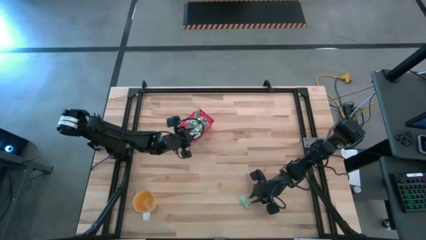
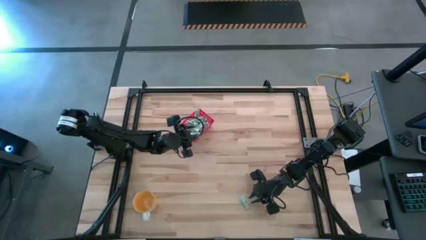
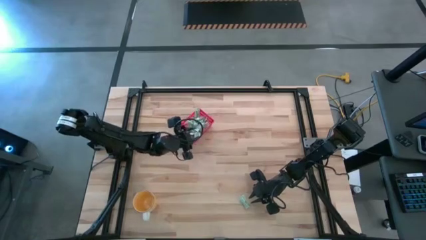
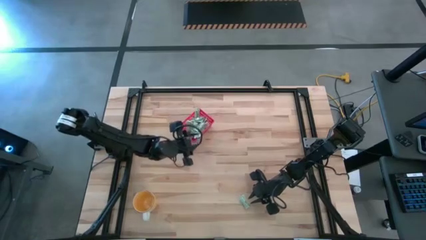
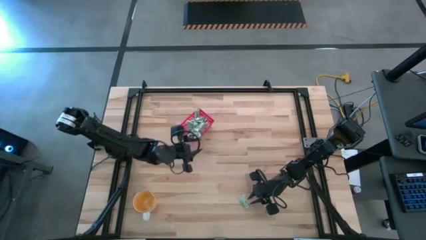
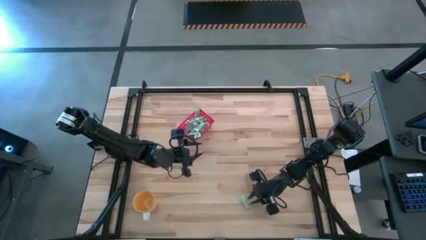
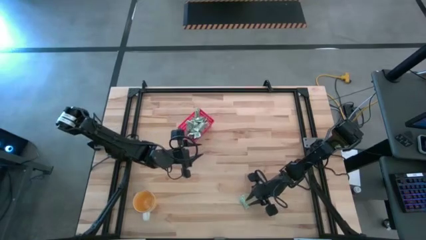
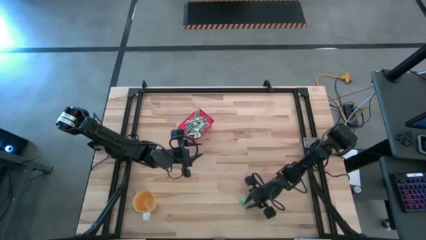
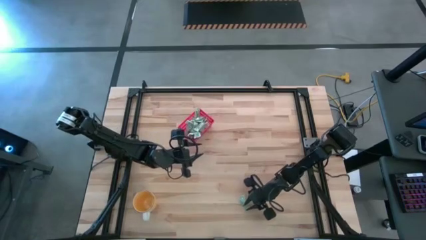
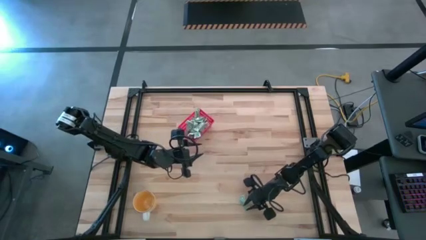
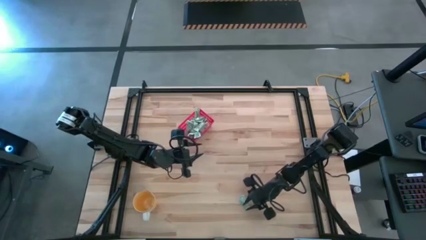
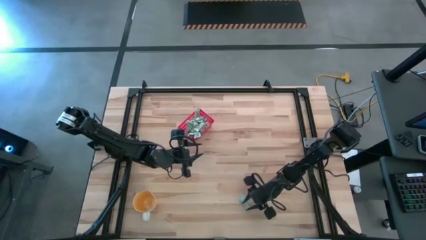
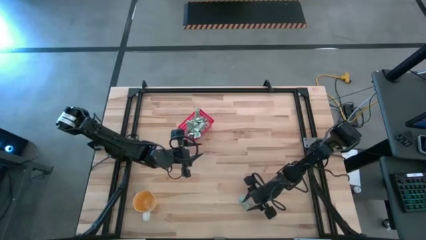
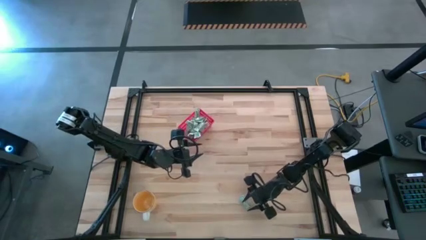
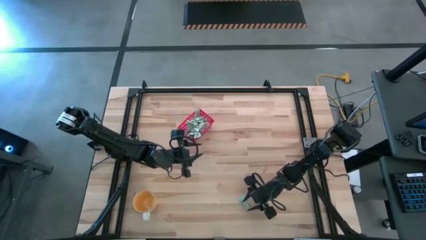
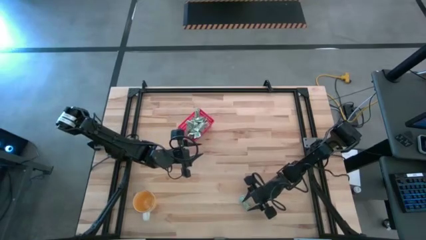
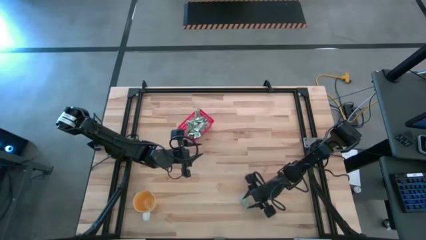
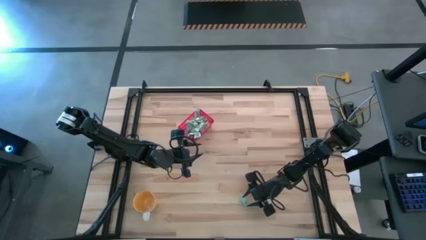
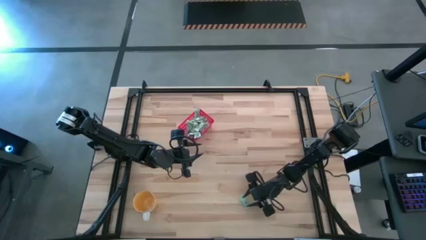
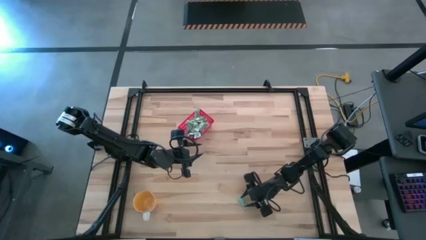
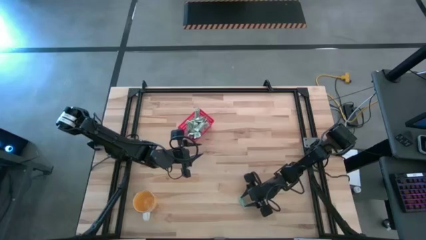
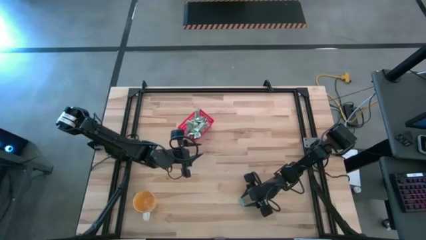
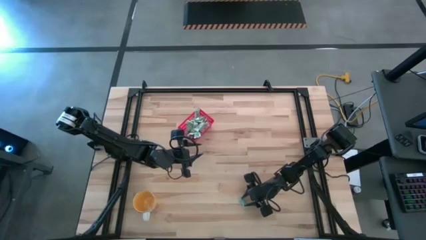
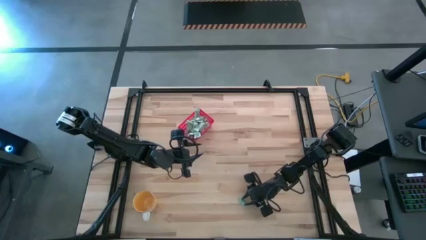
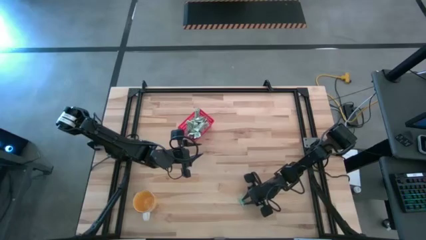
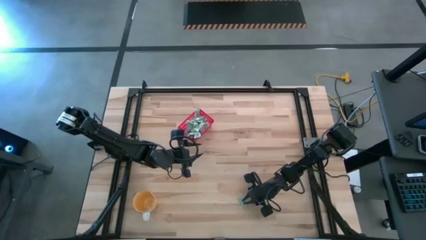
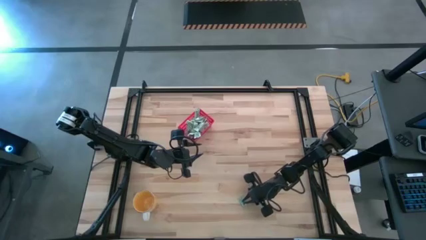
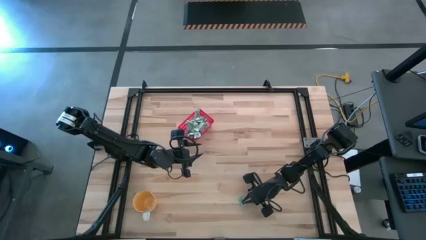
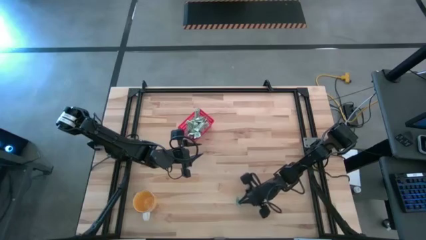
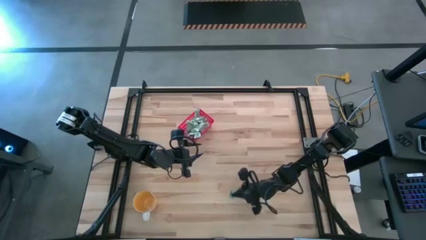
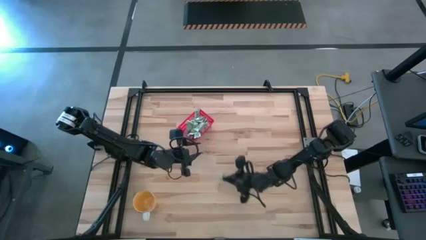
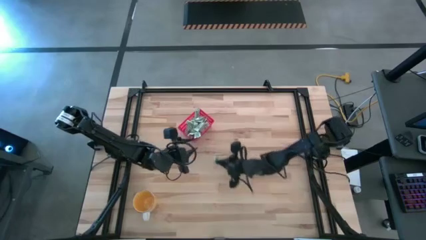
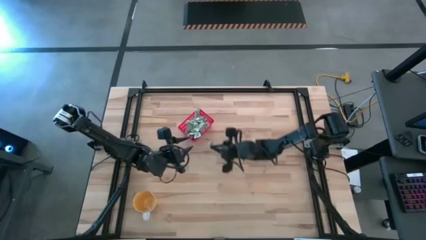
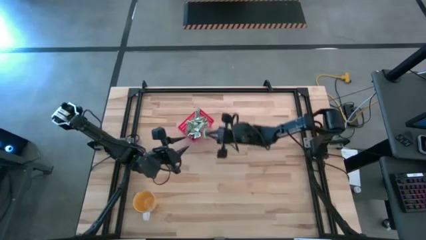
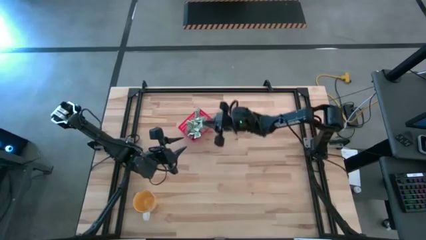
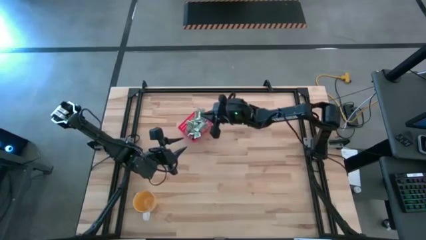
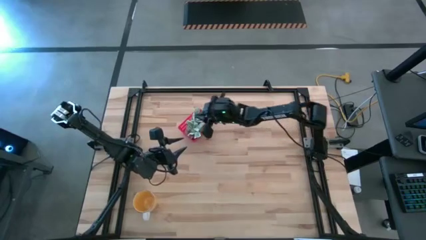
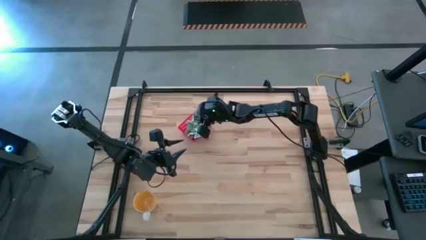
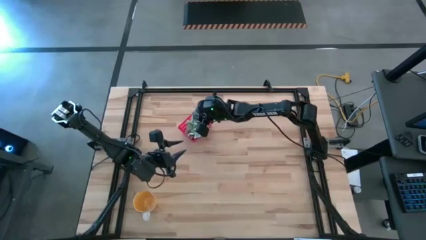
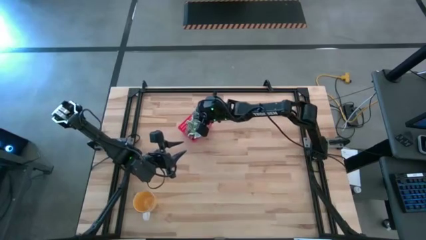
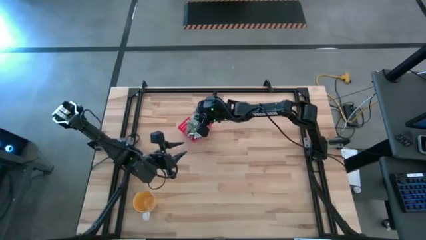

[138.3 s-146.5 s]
Task: Pick and place Stevia / Truvia into bins
Put the white stevia packet into the red bin

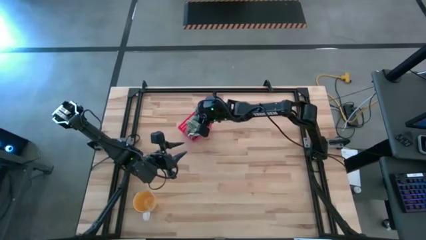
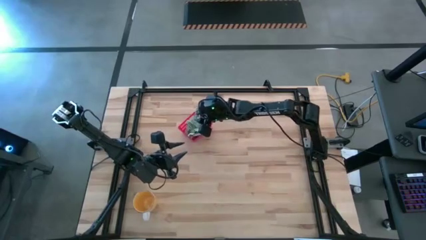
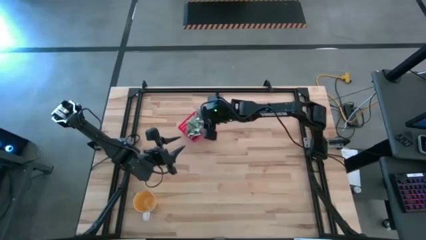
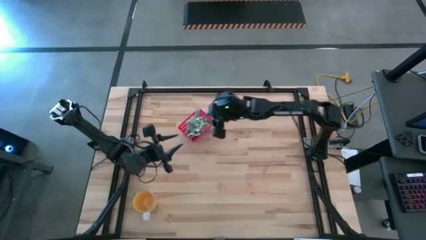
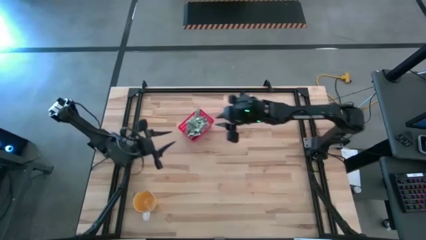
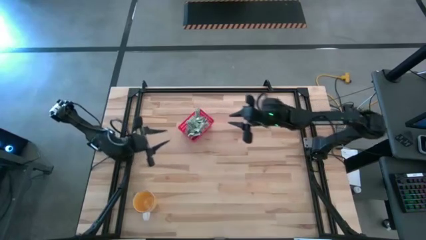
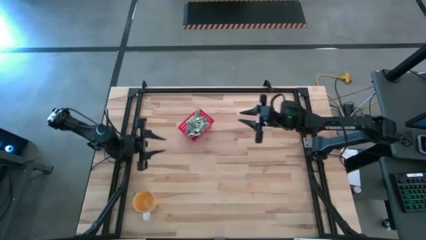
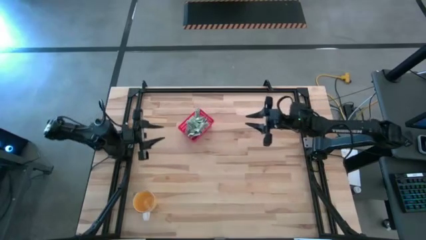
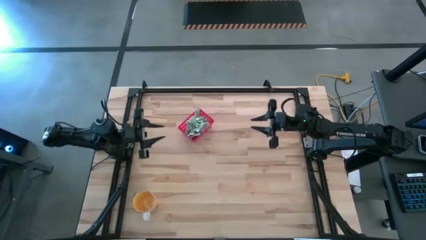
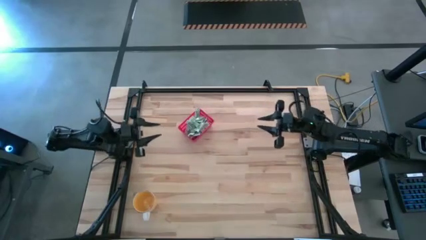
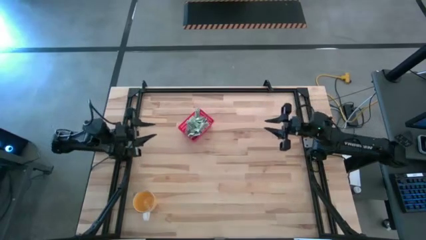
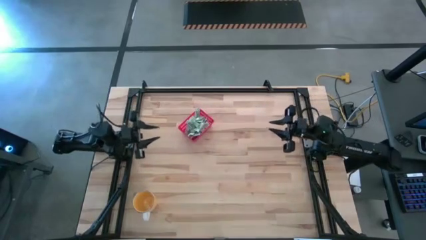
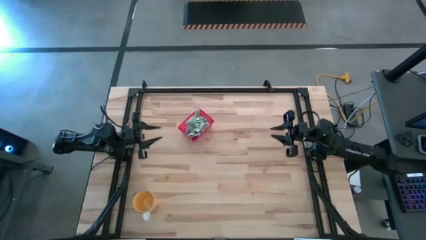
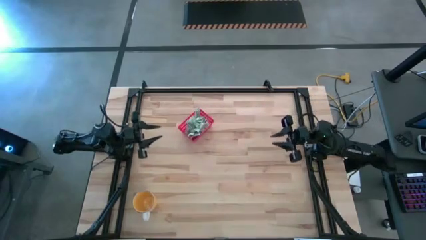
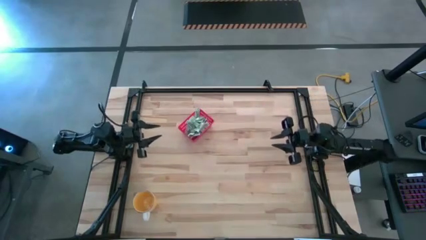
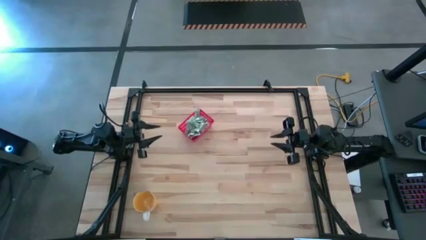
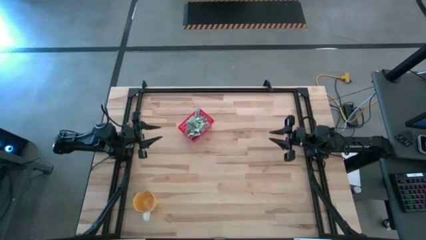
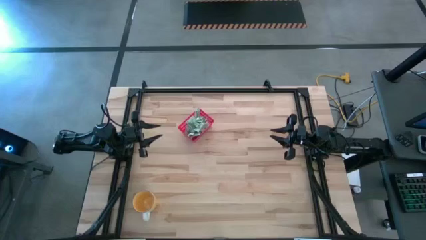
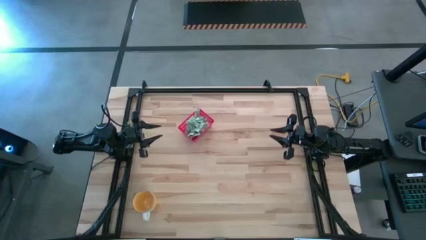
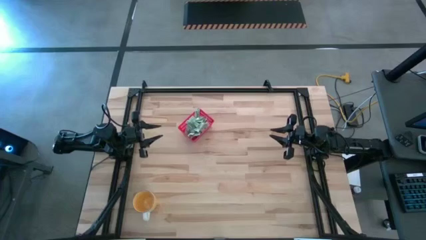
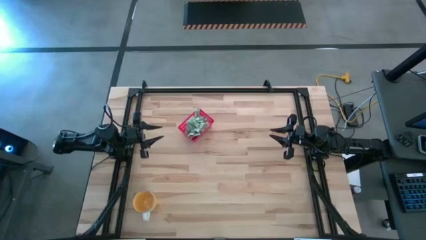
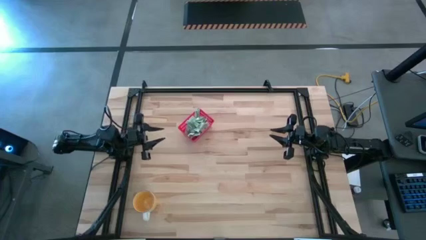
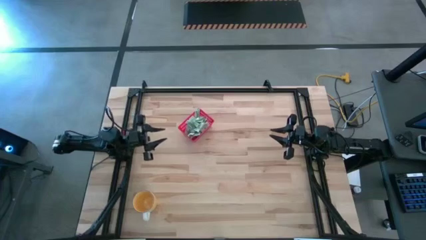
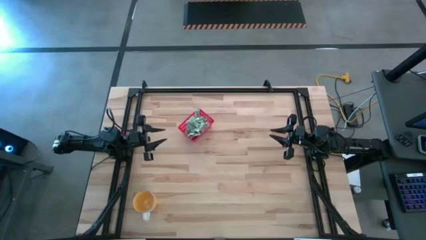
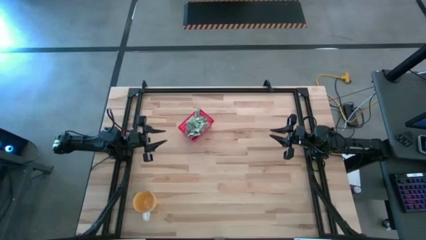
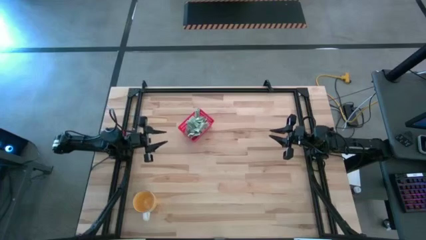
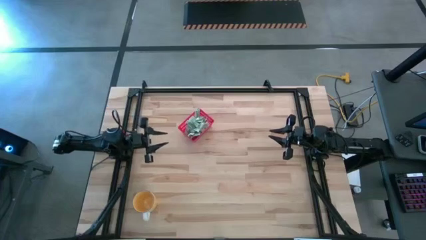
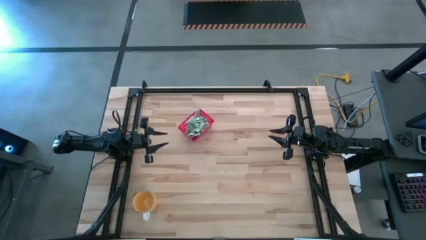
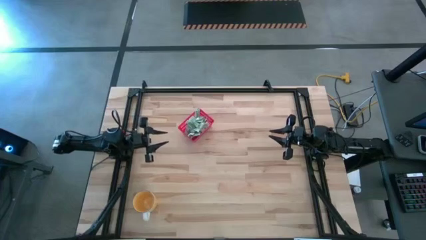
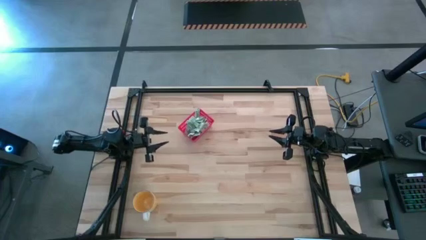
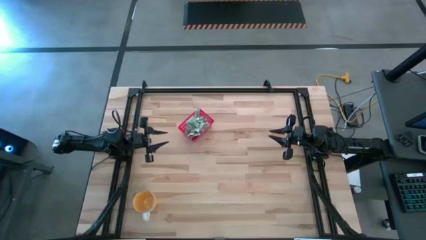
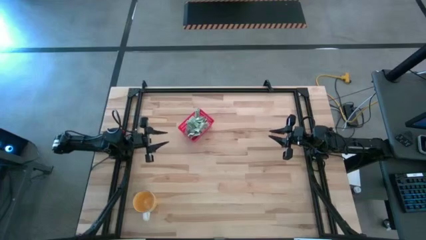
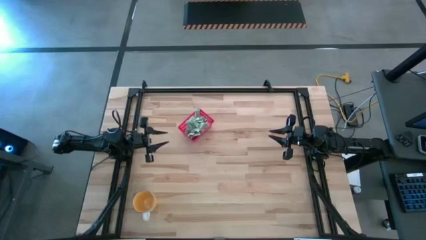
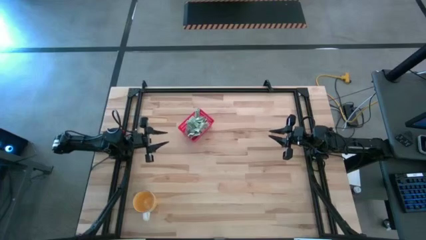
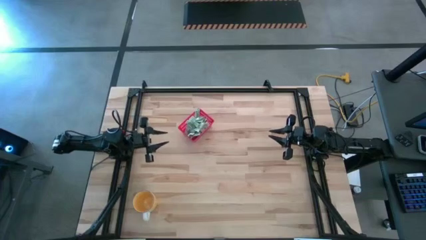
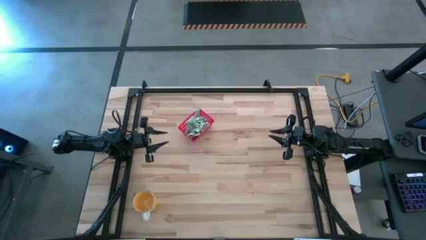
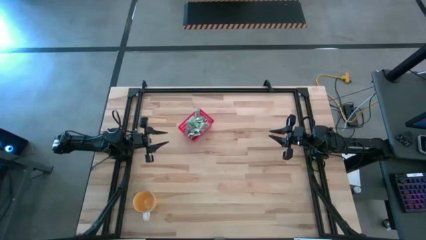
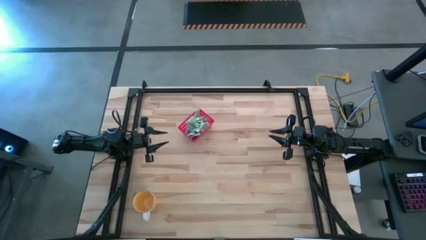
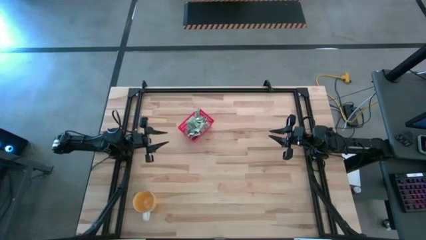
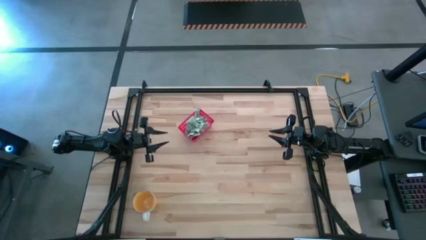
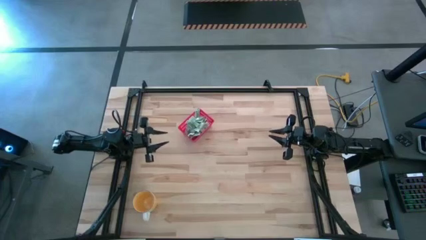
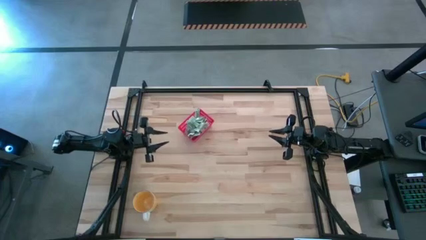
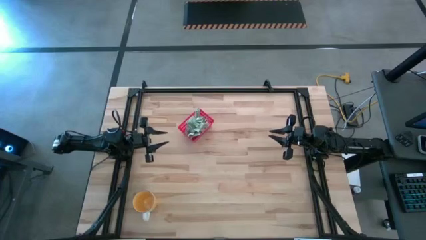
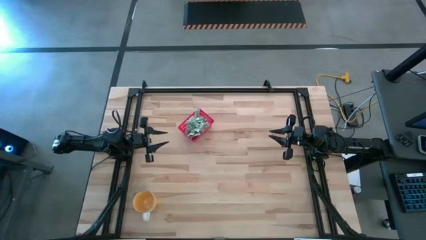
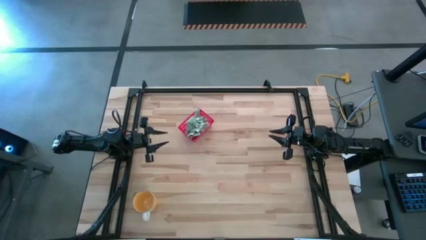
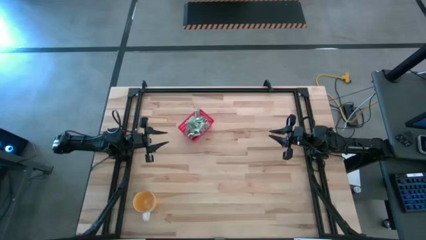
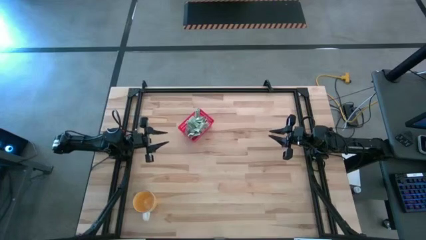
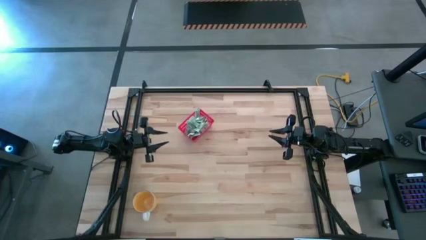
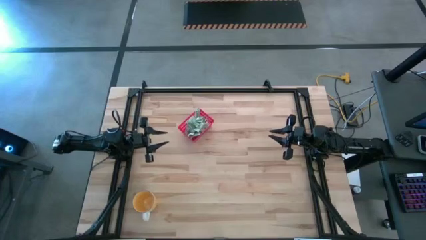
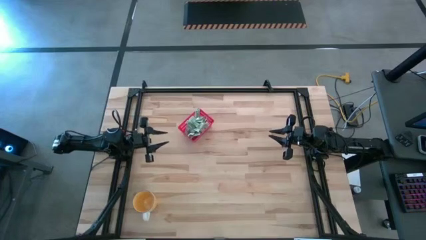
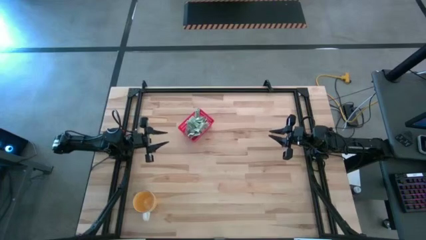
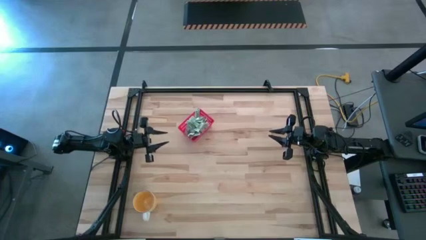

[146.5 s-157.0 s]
Return to Home Position
